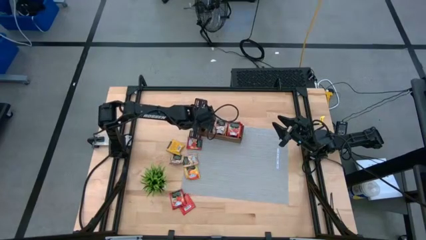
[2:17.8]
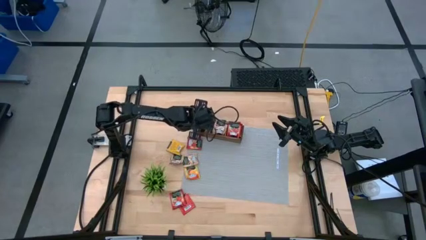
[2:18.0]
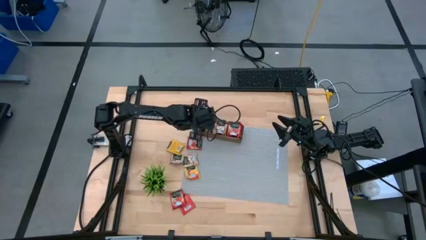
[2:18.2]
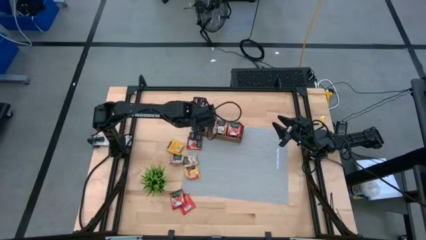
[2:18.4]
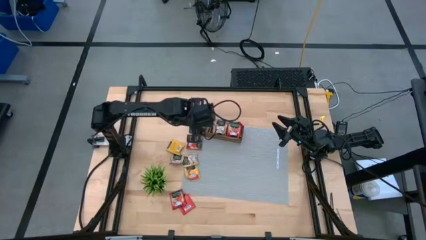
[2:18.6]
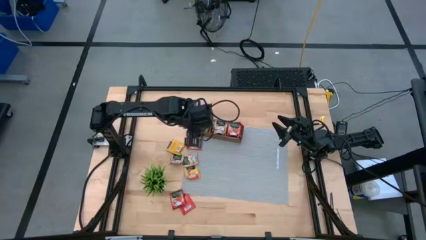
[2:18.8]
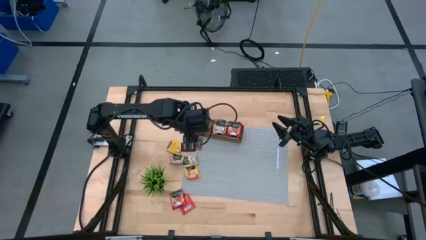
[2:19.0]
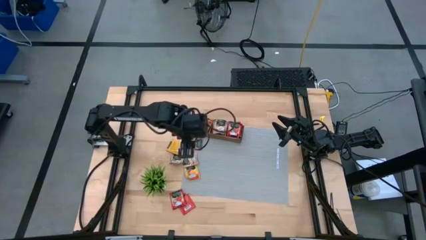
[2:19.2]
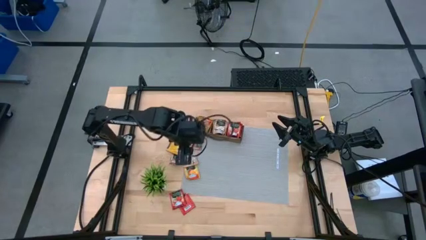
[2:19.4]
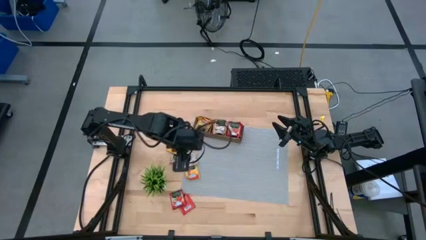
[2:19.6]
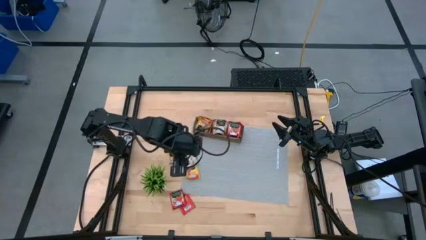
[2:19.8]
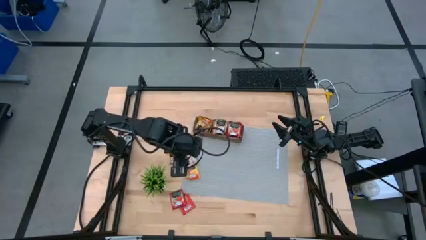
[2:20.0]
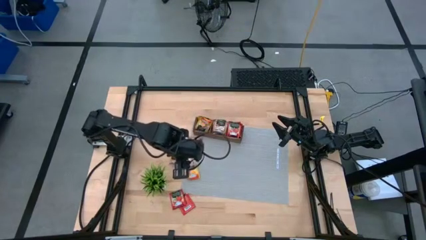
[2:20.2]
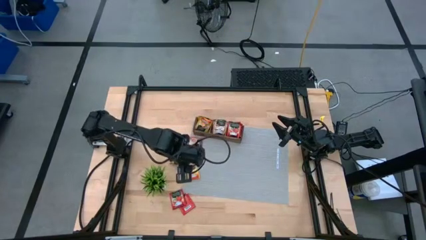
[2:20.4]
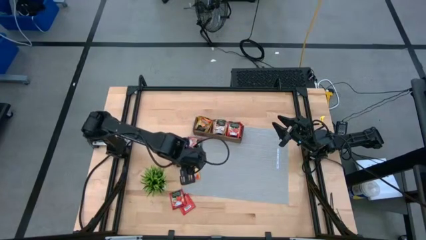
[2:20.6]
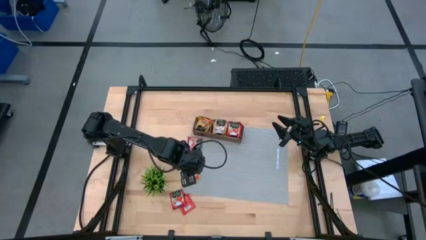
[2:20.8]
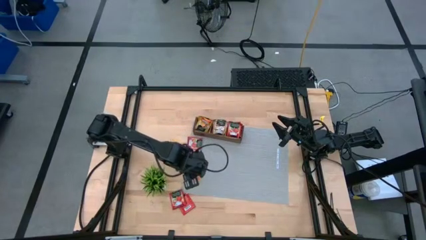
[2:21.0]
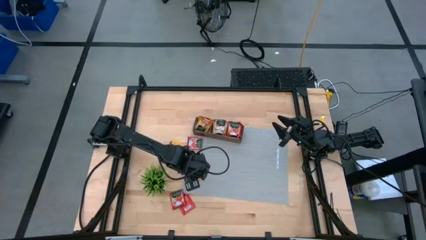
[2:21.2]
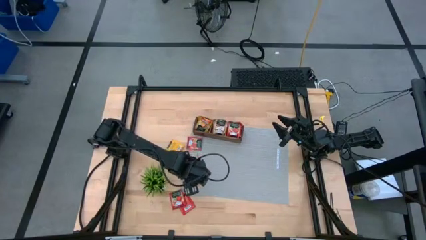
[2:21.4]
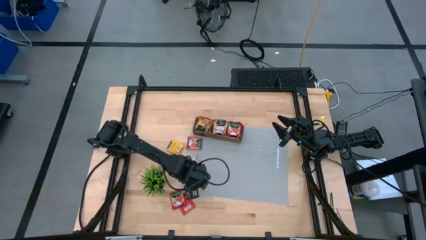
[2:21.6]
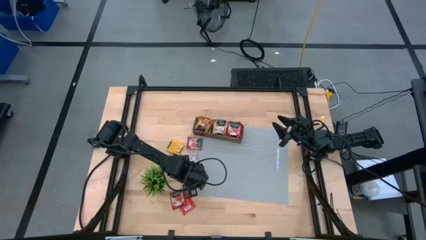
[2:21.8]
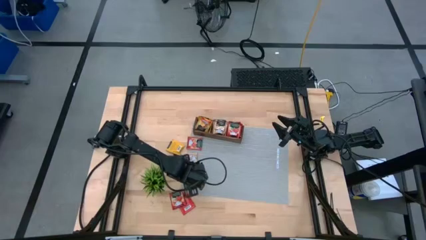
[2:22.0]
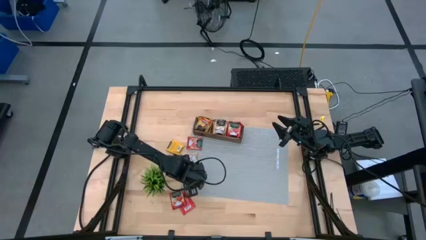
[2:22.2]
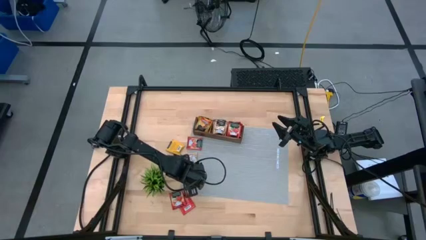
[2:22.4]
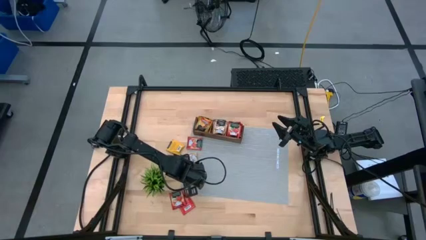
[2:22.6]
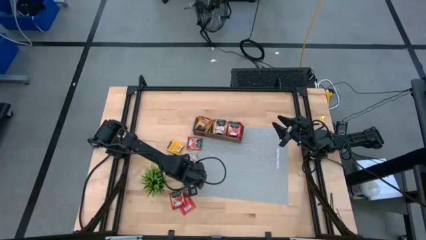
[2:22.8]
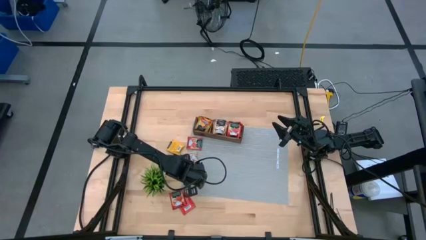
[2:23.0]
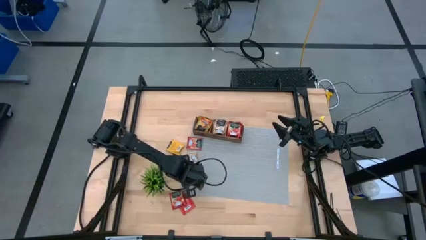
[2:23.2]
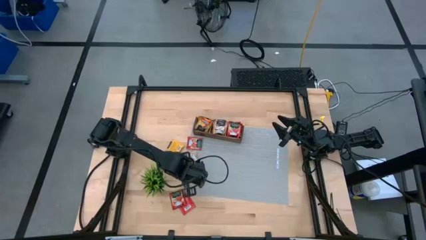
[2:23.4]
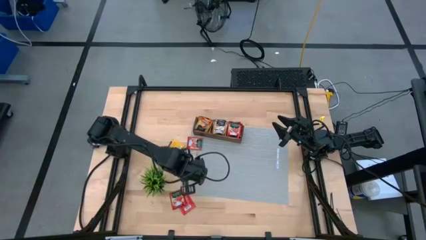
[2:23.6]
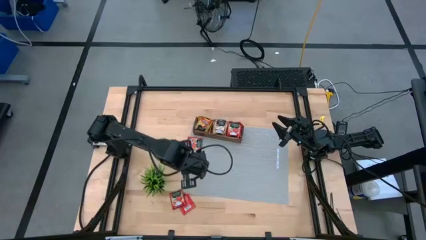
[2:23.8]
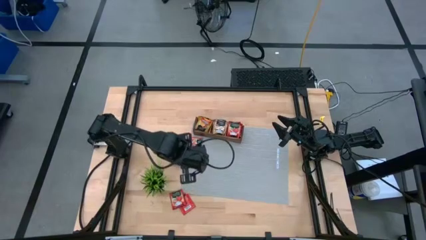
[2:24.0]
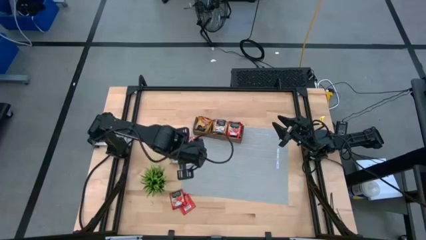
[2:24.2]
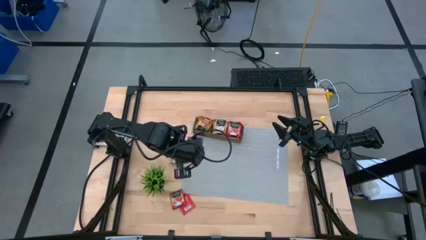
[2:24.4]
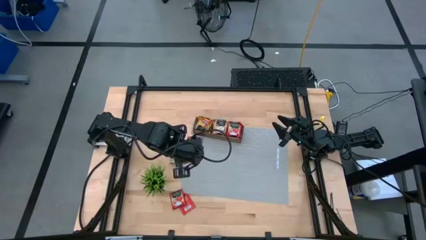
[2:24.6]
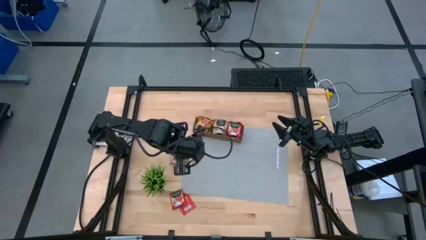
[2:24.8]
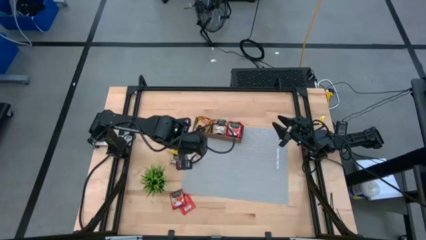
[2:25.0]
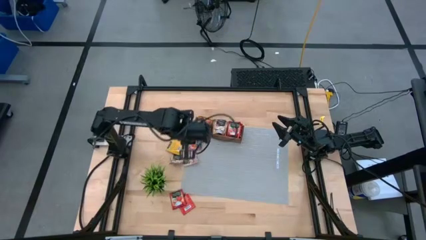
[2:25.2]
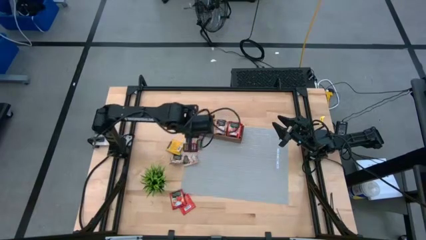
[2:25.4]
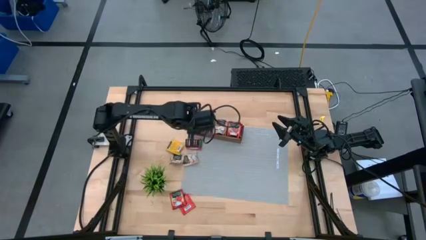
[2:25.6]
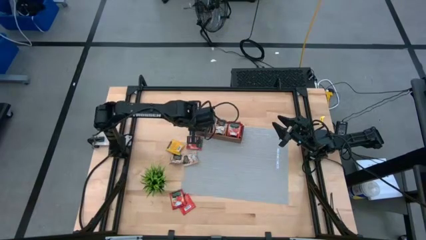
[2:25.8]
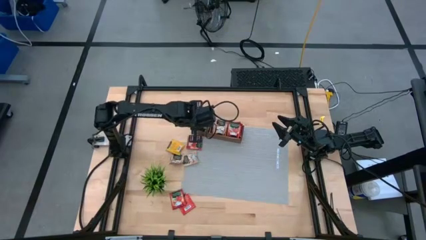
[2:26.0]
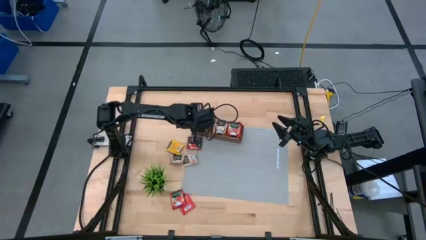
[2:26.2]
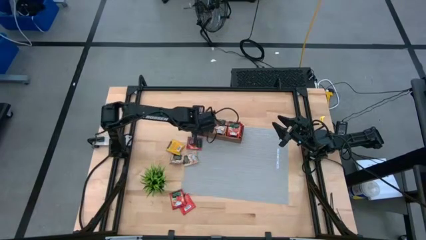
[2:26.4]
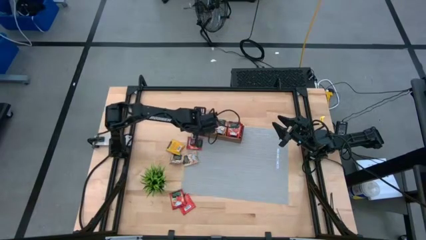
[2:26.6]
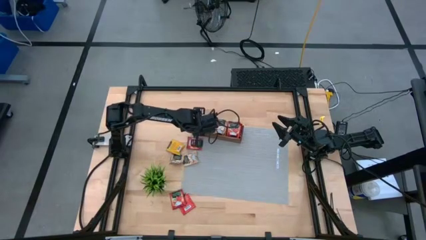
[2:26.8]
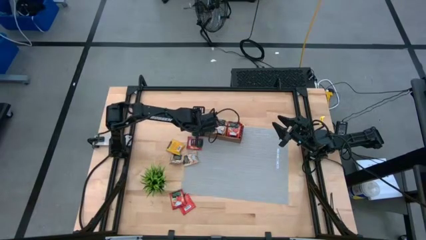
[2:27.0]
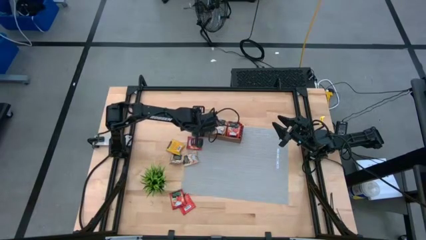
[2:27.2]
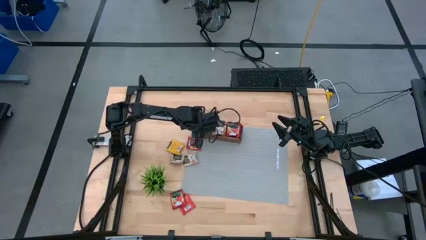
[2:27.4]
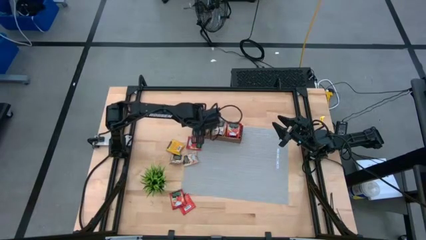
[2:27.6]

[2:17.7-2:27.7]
Task: Pick & Place Tea
Put the yellow tea bag into the left section of the wooden organizer

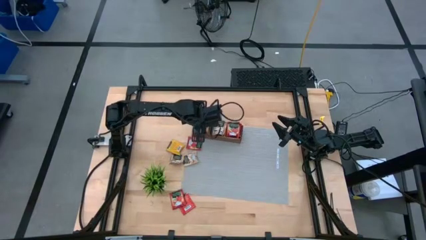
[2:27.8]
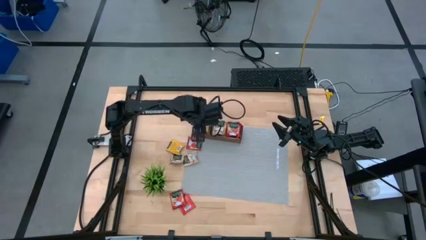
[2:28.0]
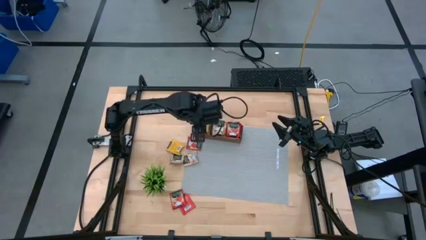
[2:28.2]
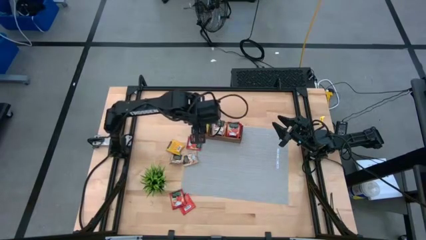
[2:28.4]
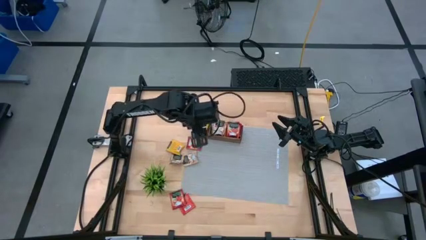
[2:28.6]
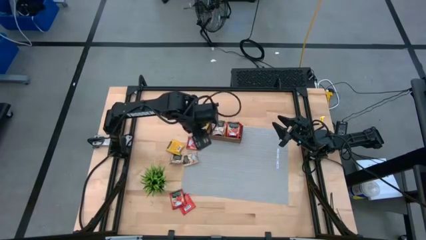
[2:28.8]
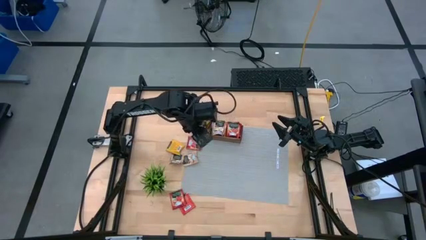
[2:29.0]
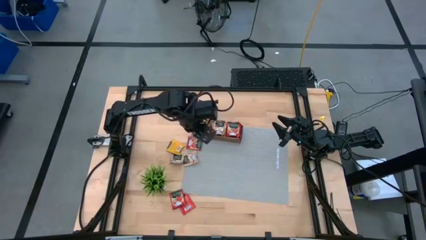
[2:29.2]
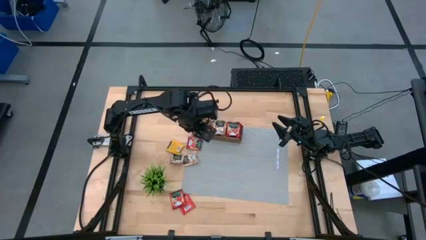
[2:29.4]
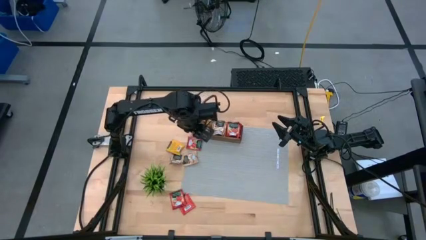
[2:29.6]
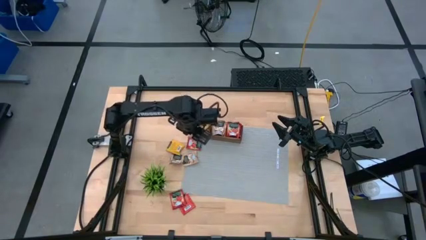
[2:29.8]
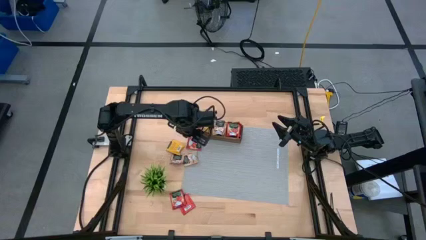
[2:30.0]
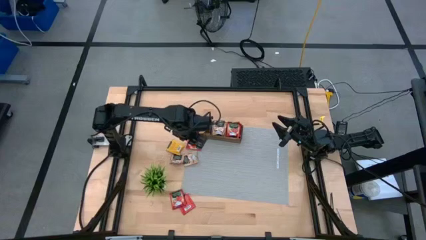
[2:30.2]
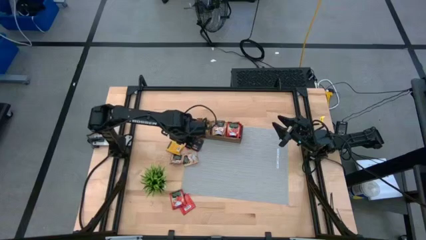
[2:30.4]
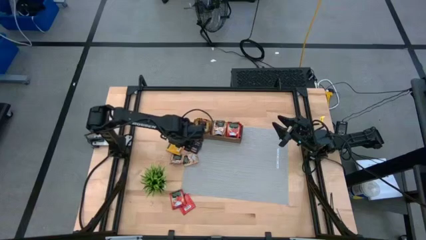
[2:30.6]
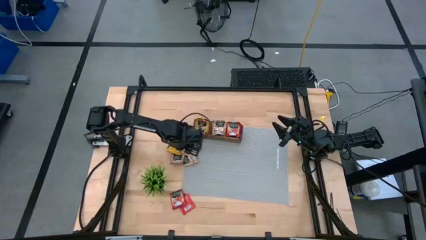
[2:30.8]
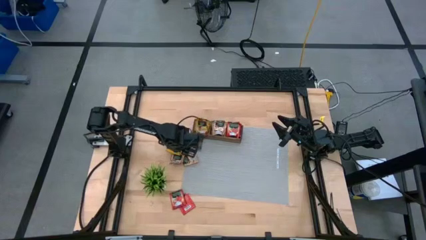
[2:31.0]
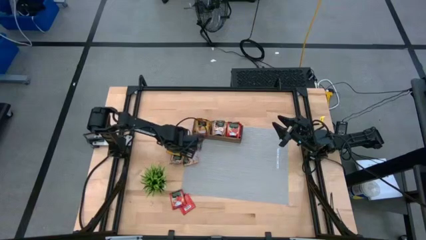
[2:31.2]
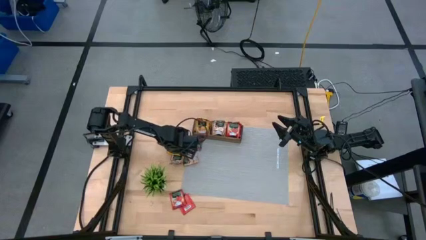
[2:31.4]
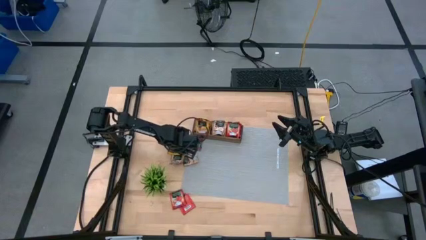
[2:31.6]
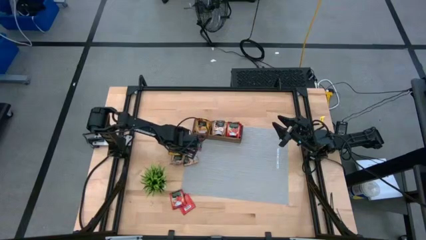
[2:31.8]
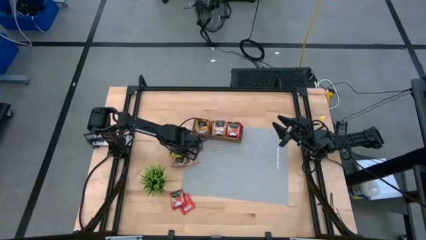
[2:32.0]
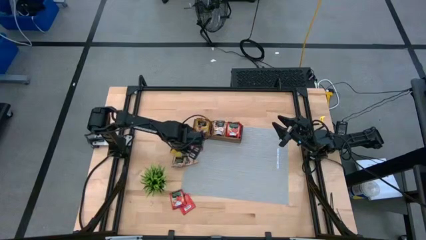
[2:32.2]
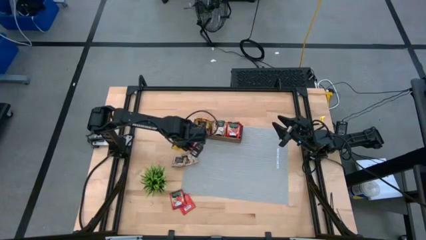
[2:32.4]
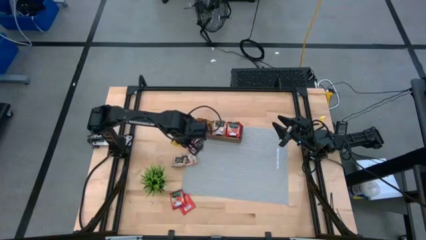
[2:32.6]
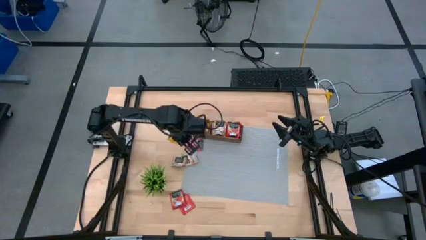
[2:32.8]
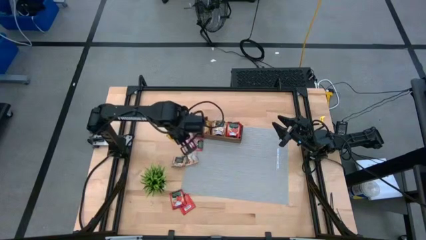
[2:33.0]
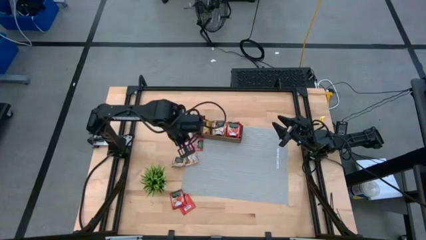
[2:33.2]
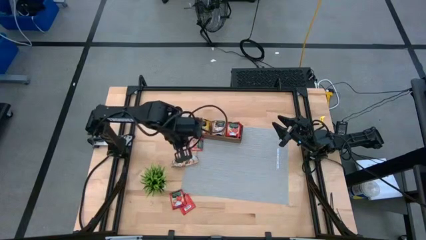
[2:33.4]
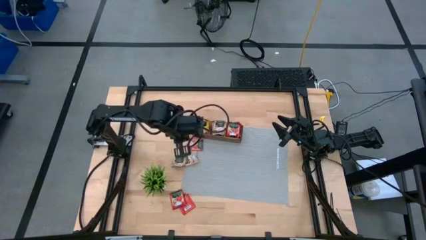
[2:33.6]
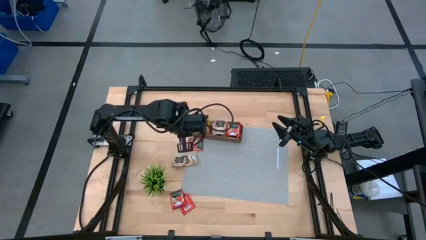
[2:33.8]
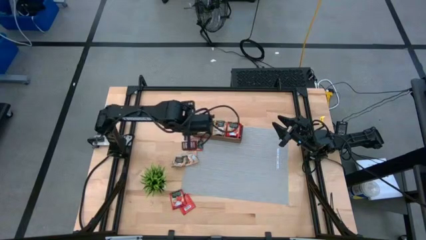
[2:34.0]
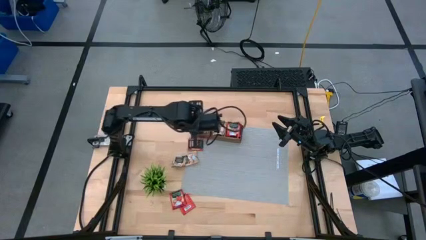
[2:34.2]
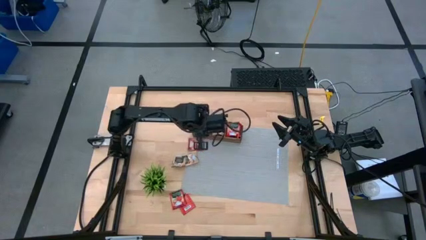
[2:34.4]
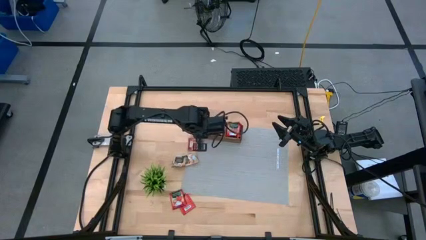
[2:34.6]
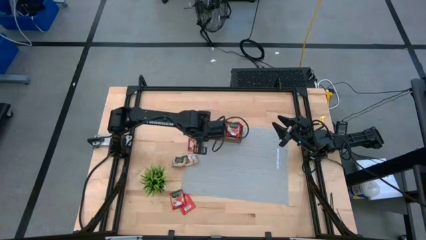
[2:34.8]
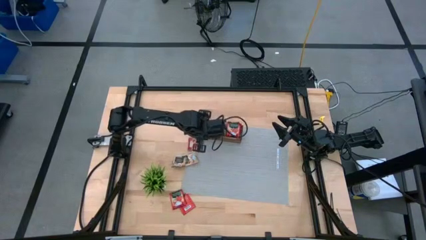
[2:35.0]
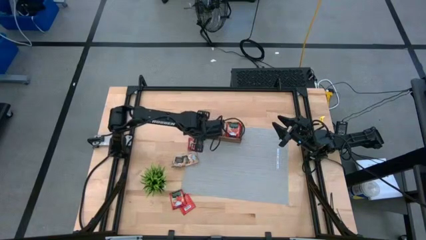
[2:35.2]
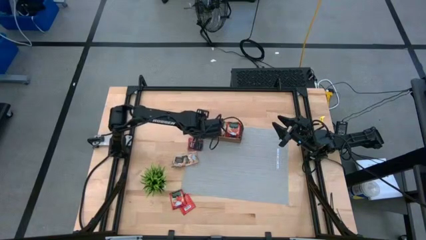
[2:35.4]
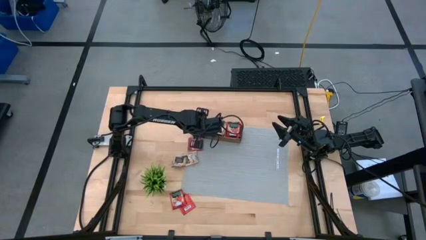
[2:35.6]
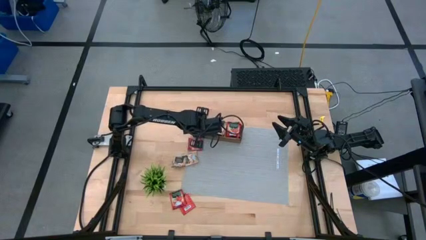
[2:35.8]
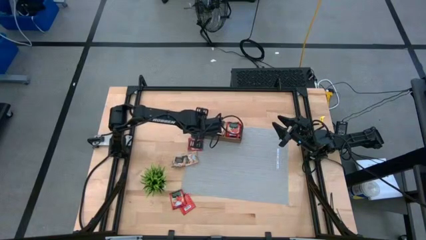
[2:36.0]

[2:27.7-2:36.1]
Put the yellow tea bag into the left section of the wooden organizer
